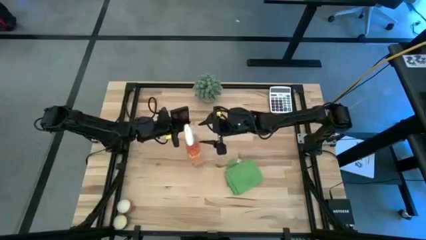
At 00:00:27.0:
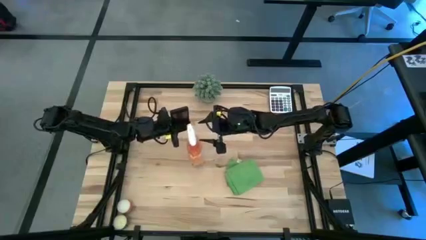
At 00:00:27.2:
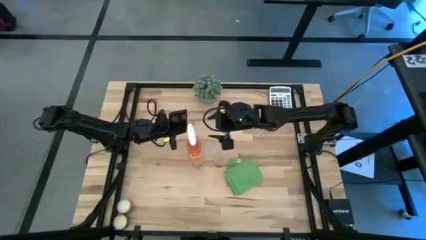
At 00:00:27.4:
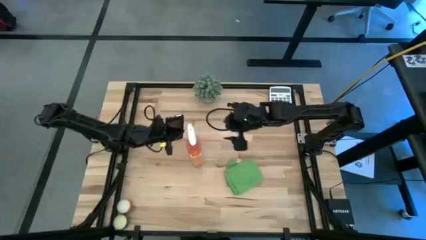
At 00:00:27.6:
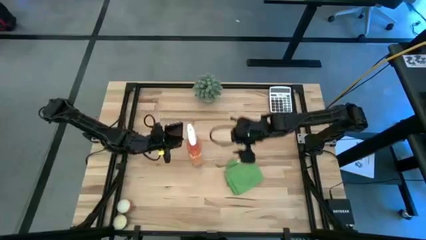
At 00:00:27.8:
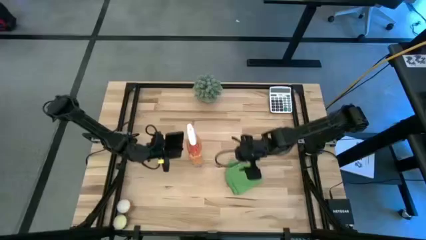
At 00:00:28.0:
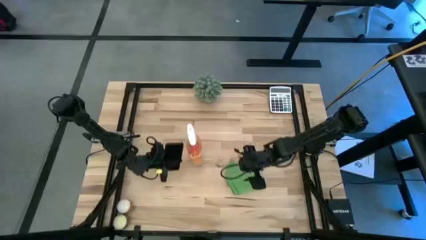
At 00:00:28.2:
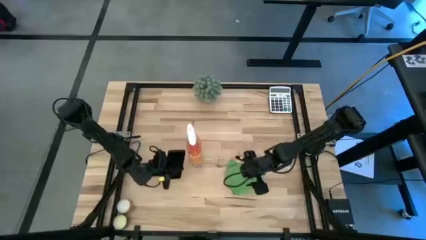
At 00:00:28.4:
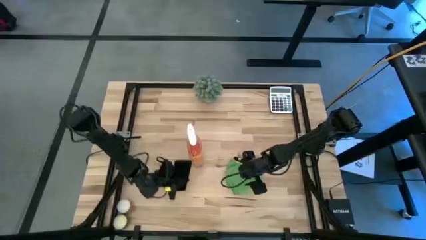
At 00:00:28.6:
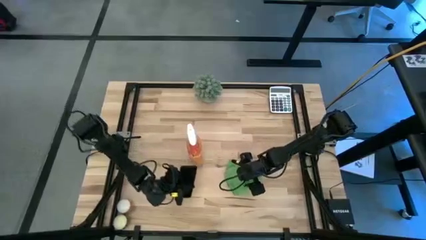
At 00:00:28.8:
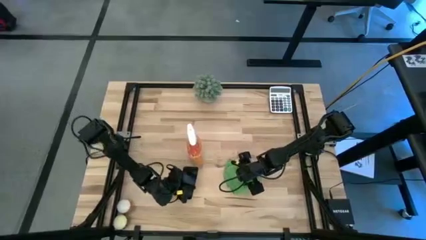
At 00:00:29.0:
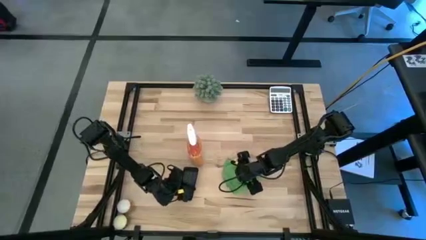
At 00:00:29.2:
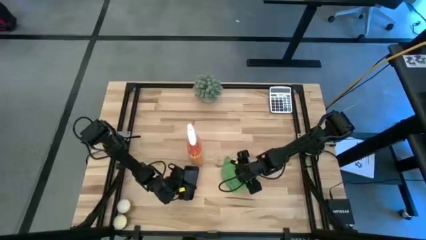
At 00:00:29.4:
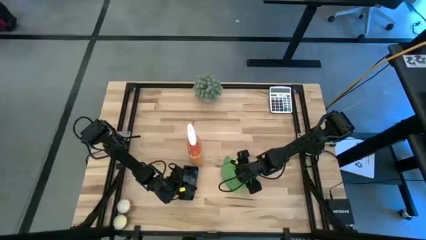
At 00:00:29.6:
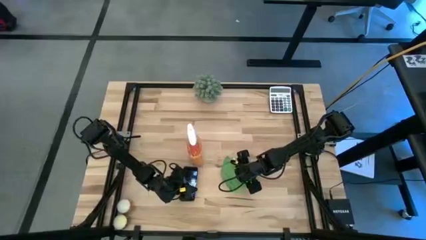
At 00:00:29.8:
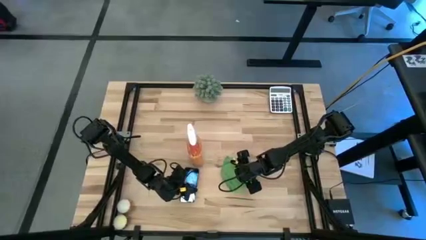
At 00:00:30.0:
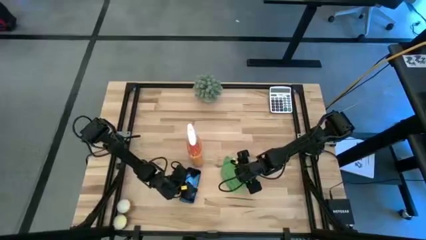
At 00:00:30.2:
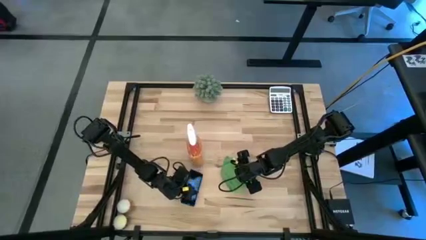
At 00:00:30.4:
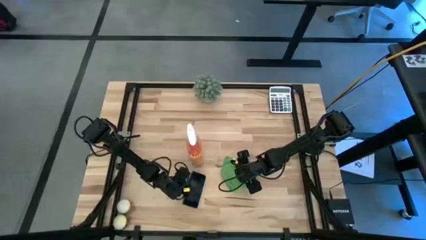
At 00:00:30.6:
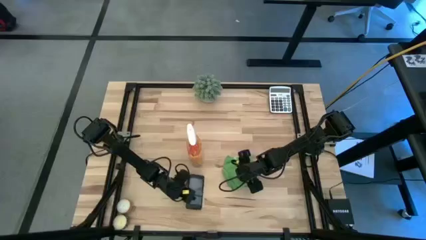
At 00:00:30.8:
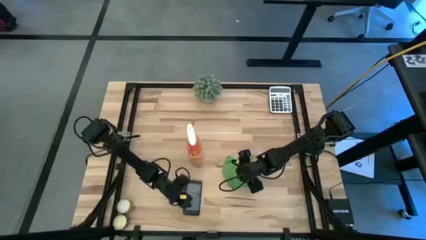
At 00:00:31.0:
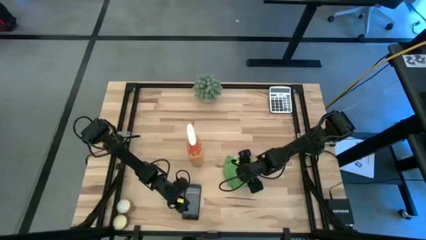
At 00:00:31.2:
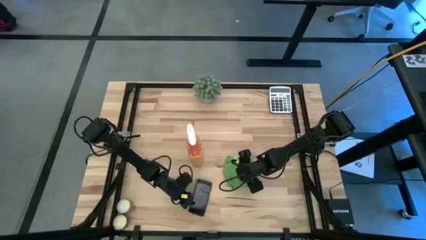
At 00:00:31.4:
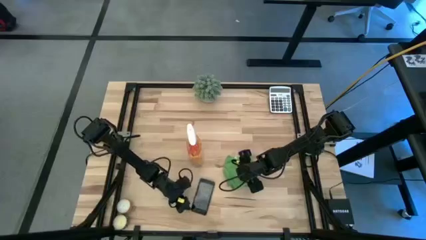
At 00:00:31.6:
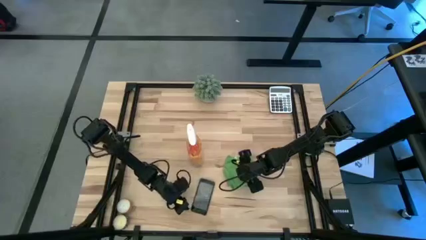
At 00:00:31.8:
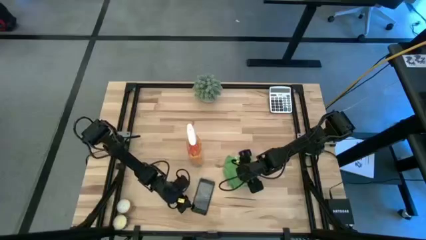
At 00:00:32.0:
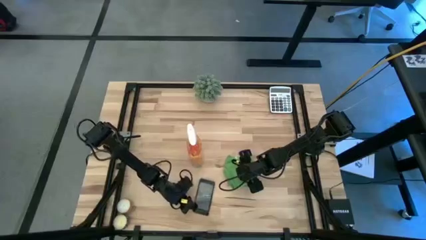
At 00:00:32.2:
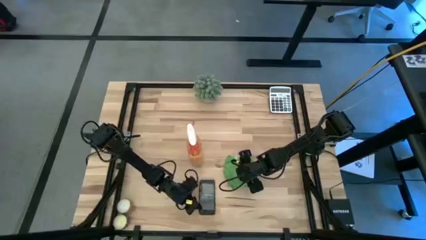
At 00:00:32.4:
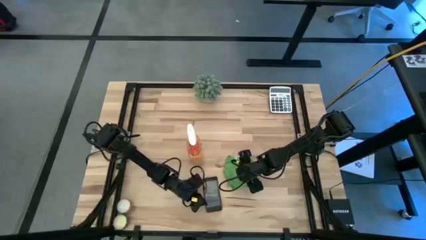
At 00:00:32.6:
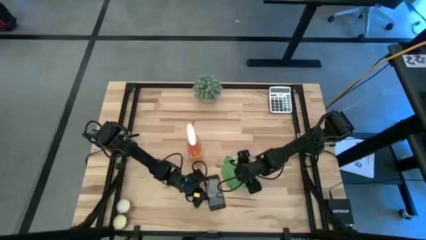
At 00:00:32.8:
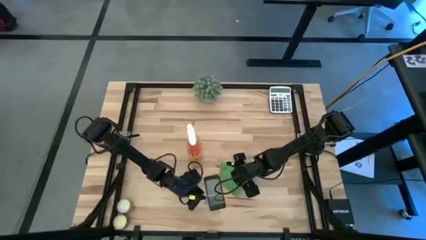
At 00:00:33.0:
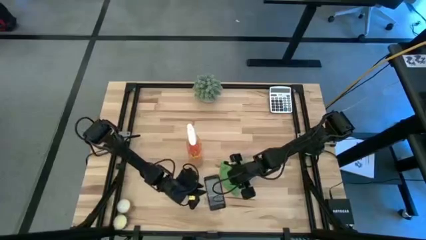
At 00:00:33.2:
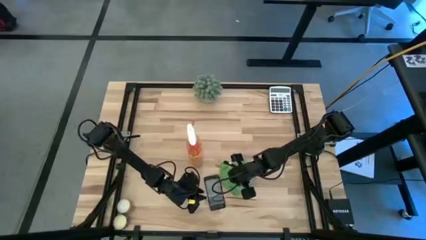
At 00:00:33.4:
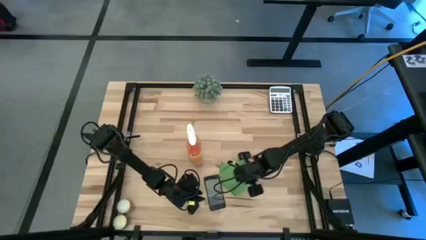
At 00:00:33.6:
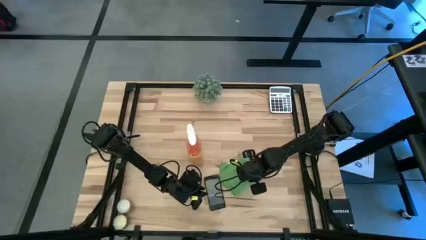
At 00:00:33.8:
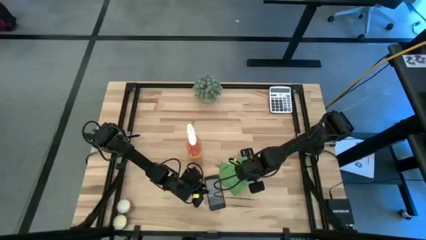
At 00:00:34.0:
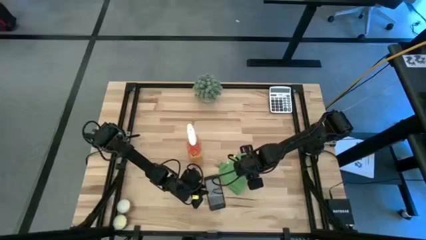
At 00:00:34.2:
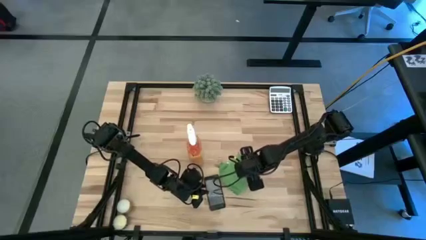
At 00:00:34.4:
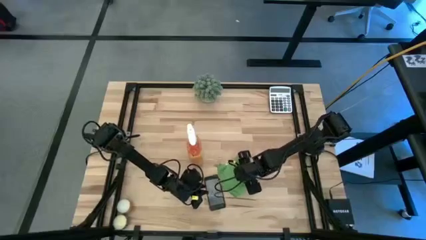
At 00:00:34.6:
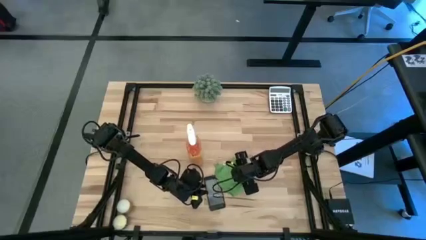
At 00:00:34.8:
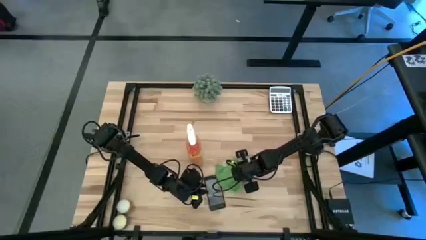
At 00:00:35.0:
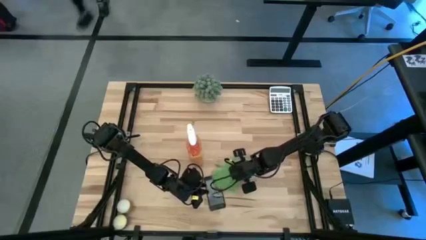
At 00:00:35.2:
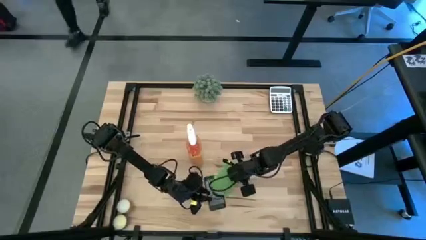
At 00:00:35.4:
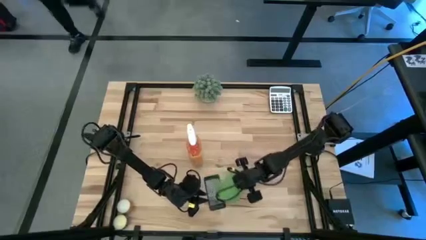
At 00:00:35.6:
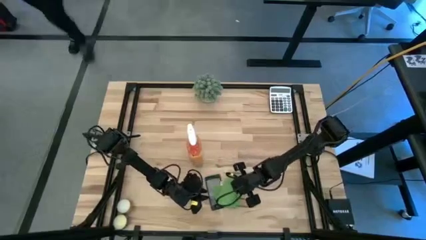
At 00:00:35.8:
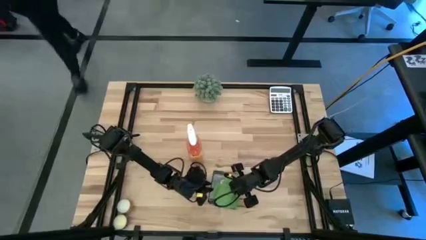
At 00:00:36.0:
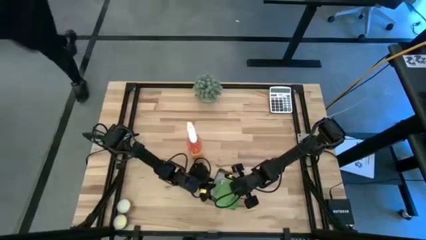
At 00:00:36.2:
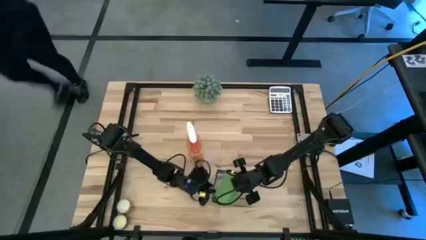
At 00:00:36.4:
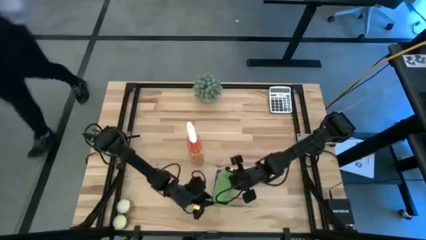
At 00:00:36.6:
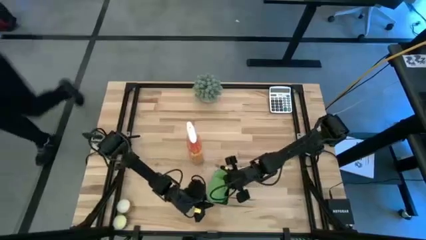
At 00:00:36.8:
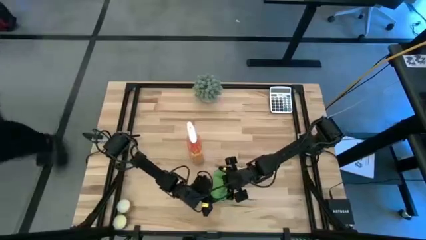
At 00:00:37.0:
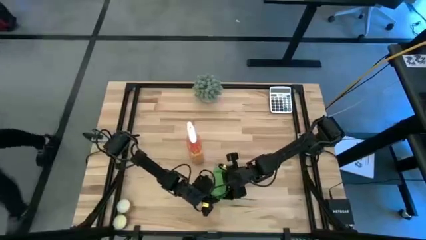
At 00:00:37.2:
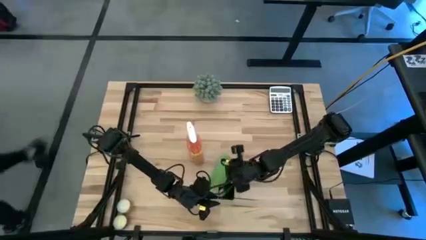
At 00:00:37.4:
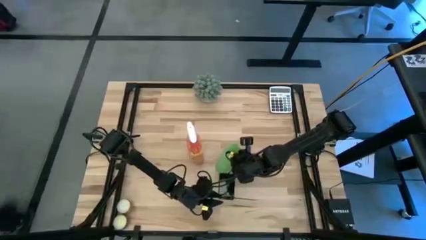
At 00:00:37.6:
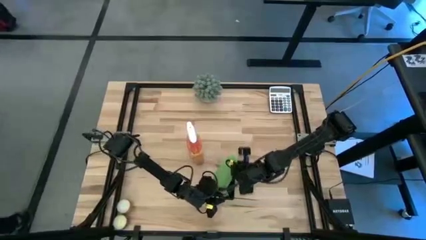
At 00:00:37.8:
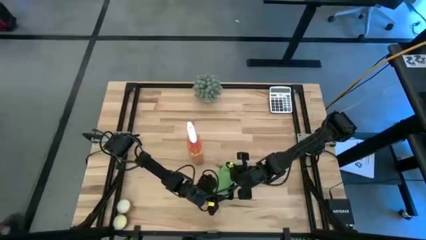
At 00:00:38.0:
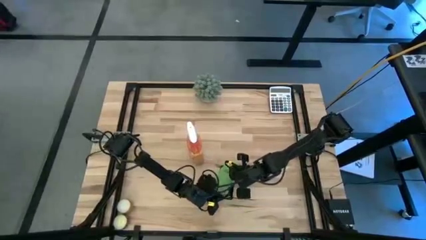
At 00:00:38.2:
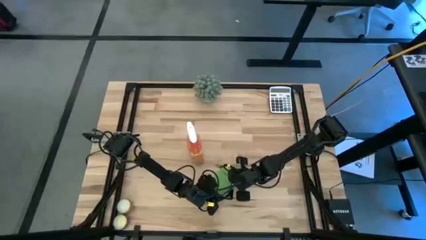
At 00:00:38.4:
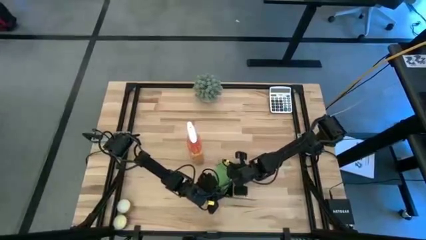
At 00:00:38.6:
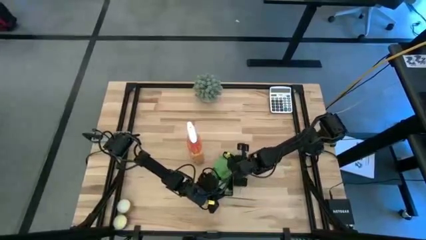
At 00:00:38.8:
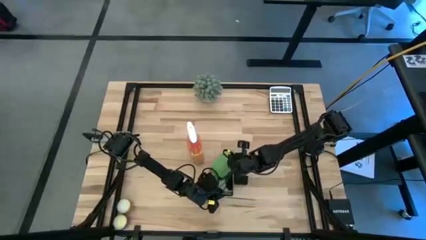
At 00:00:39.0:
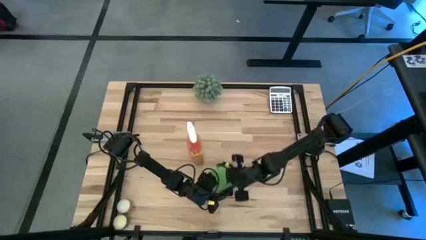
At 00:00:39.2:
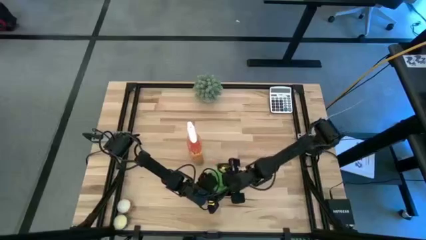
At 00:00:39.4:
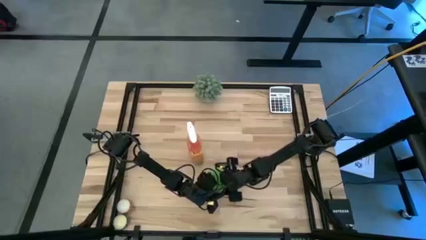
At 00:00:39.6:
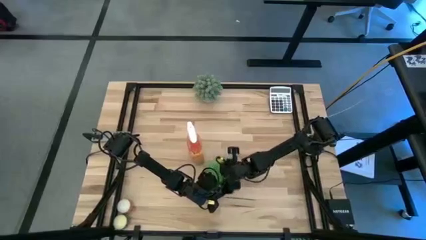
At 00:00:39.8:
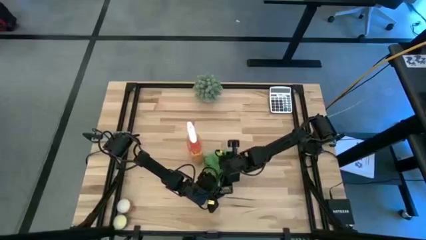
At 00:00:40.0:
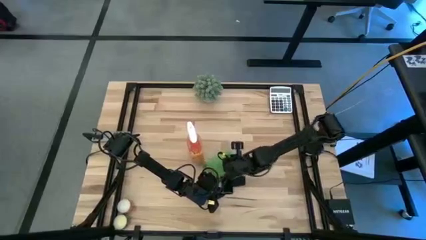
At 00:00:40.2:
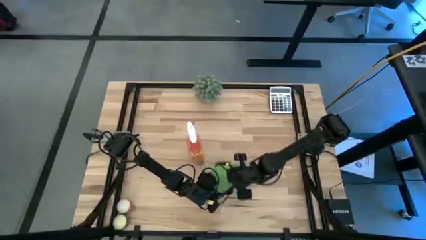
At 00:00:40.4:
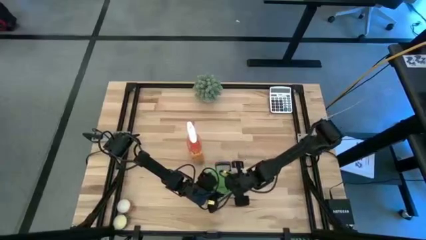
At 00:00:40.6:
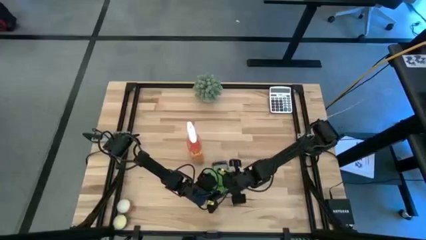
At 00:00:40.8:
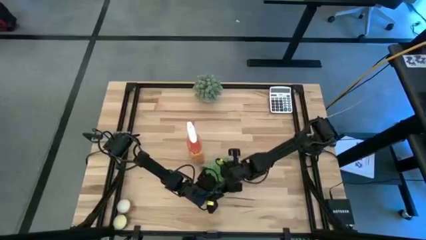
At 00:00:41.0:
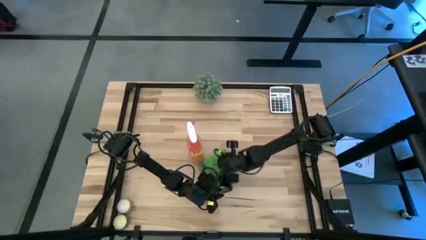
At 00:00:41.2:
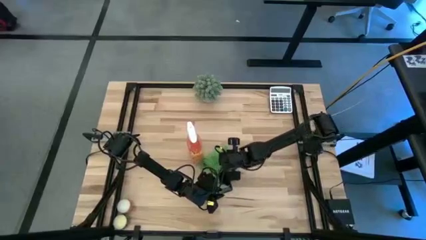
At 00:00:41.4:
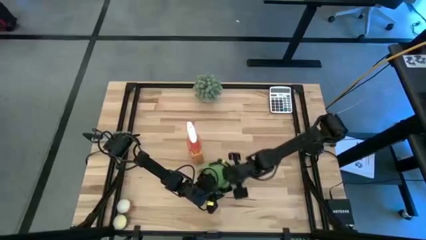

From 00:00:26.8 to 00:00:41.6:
Task: Apply microfiber cloth
Wipe the front of the black cellphone using the green microfiber cloth
